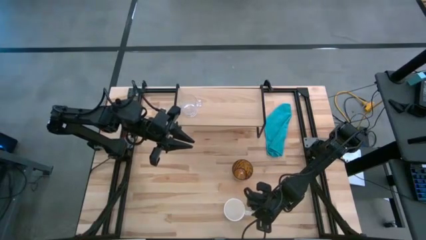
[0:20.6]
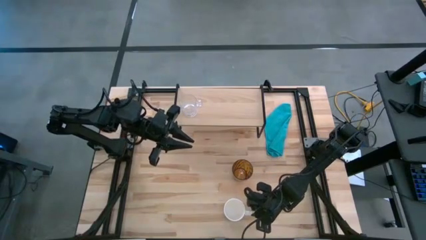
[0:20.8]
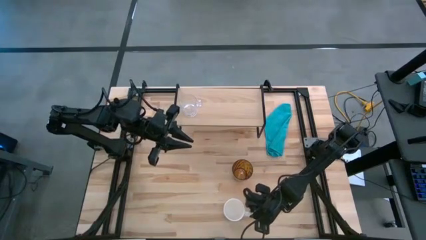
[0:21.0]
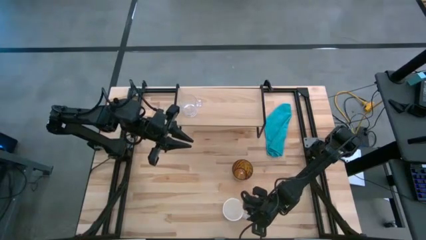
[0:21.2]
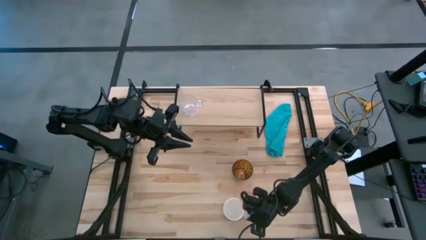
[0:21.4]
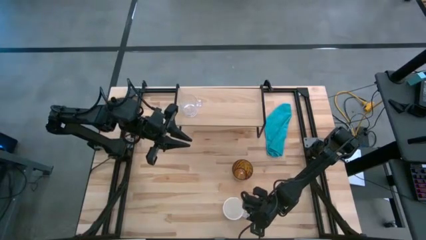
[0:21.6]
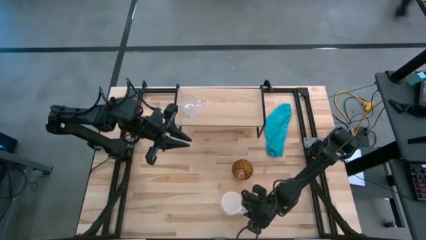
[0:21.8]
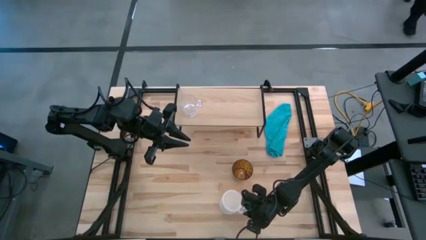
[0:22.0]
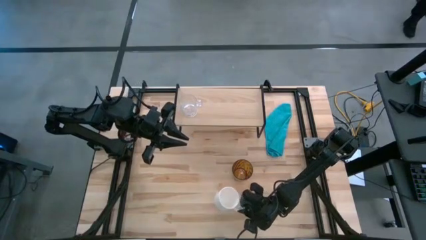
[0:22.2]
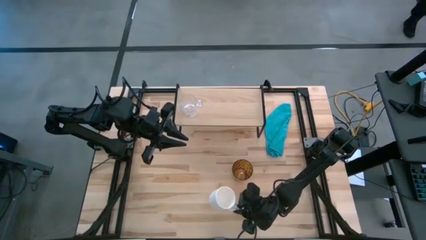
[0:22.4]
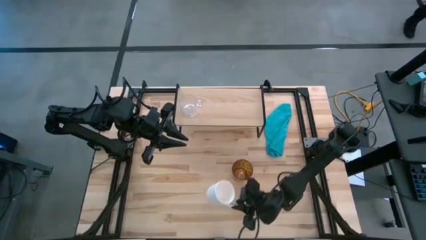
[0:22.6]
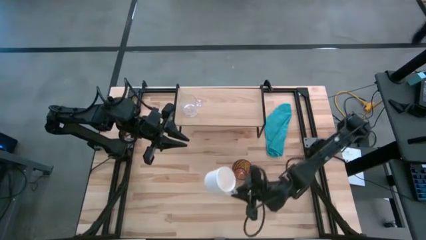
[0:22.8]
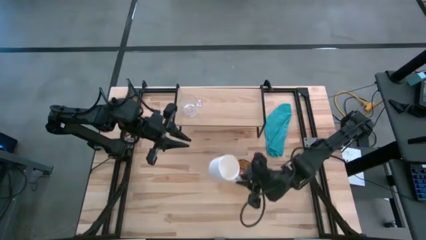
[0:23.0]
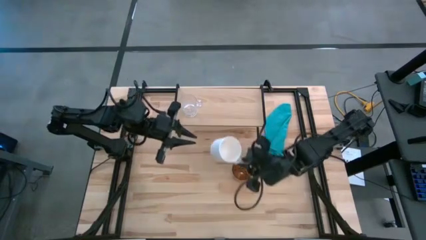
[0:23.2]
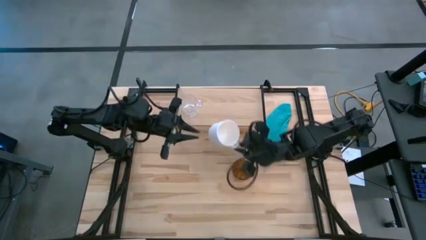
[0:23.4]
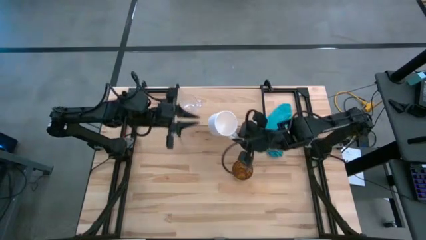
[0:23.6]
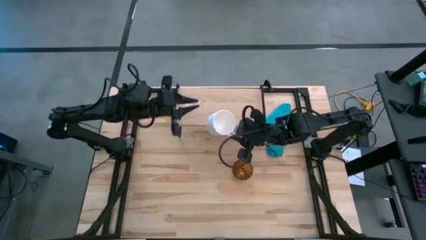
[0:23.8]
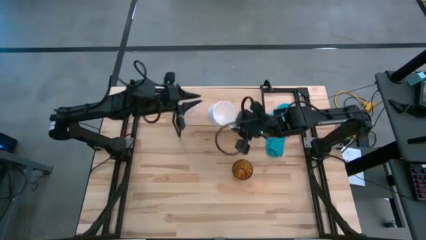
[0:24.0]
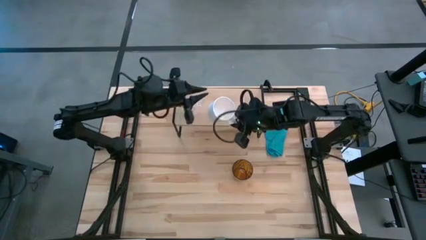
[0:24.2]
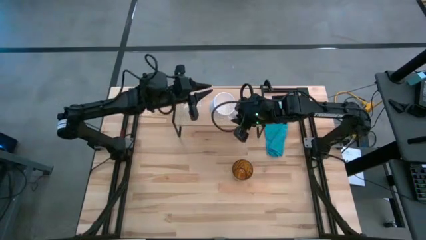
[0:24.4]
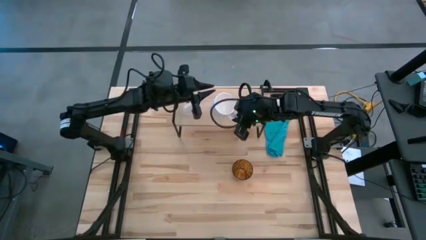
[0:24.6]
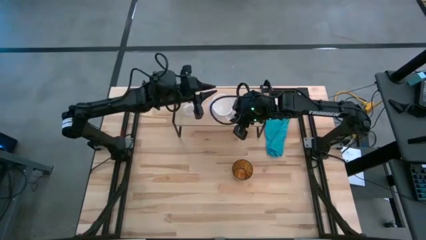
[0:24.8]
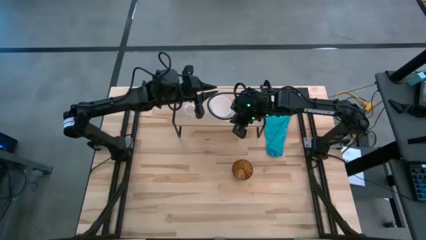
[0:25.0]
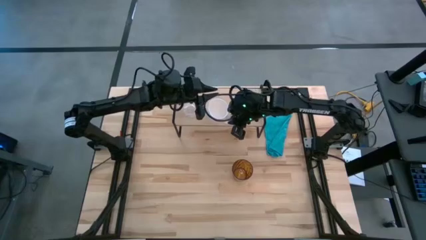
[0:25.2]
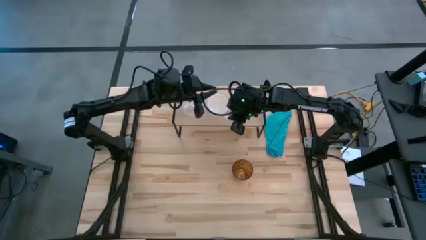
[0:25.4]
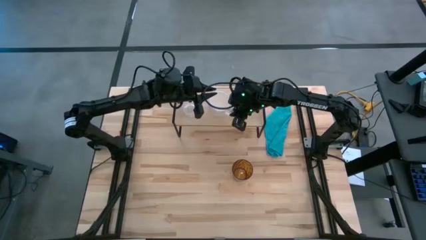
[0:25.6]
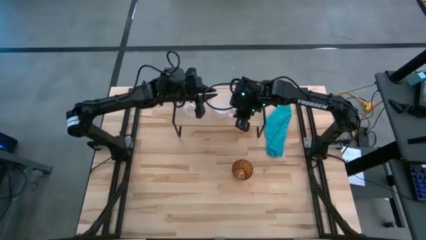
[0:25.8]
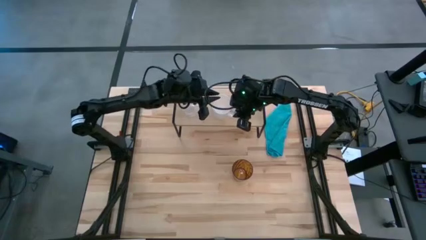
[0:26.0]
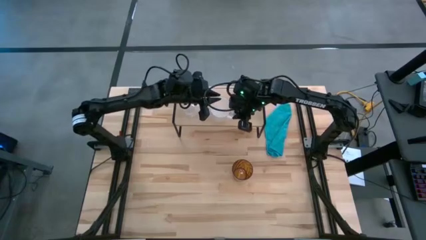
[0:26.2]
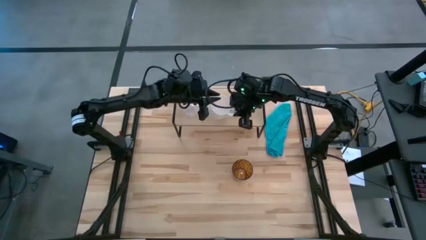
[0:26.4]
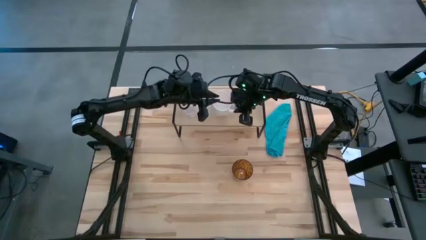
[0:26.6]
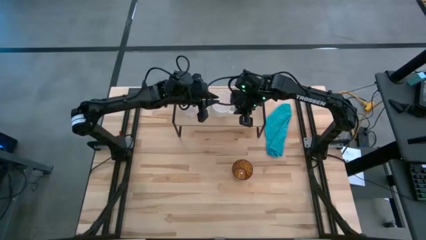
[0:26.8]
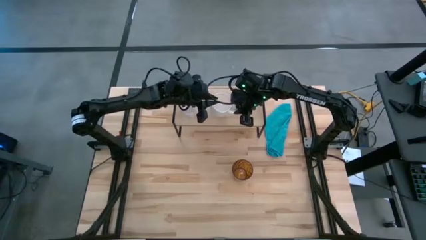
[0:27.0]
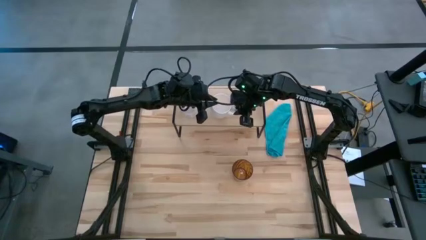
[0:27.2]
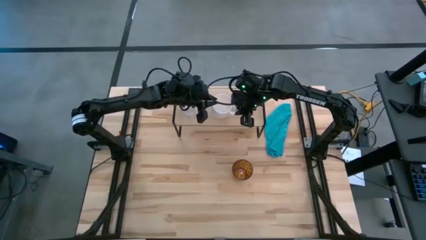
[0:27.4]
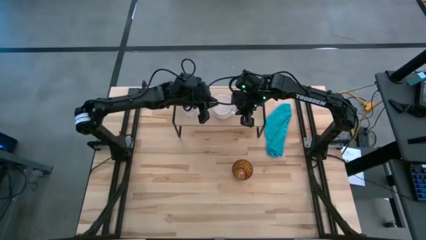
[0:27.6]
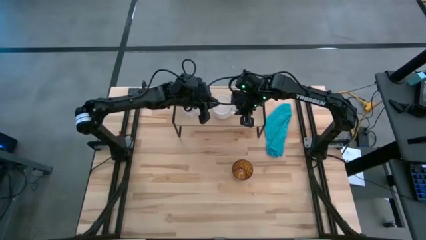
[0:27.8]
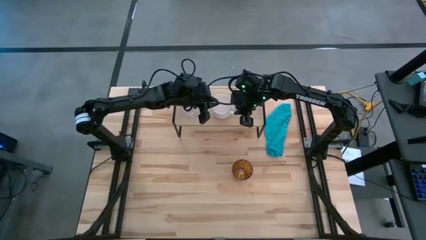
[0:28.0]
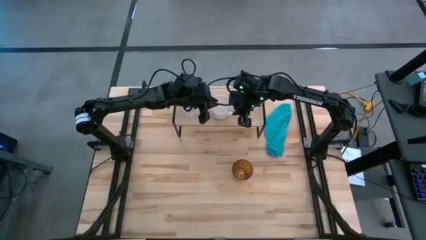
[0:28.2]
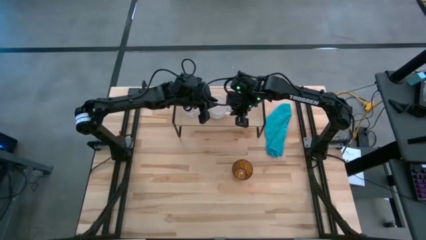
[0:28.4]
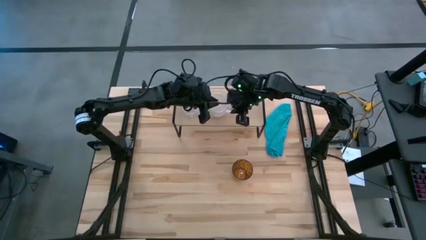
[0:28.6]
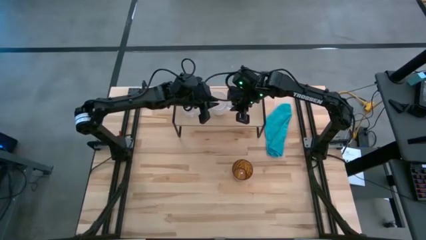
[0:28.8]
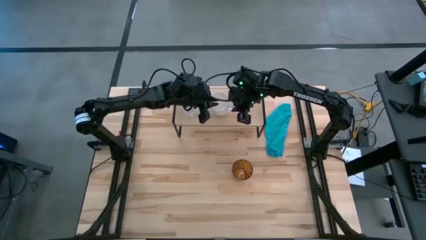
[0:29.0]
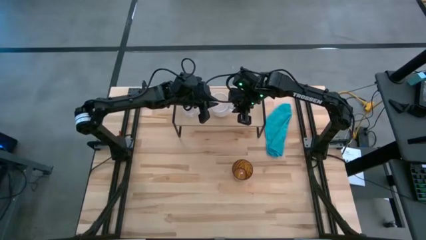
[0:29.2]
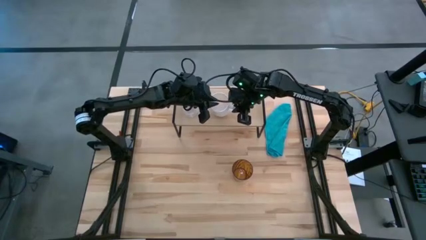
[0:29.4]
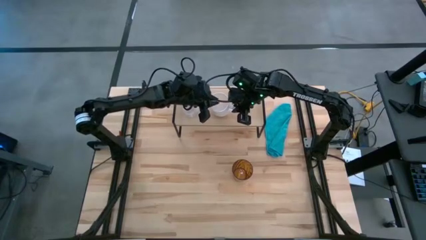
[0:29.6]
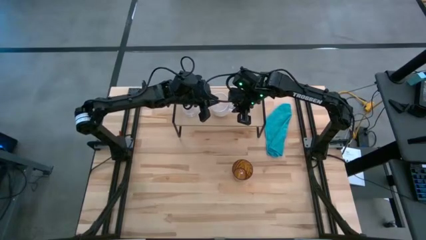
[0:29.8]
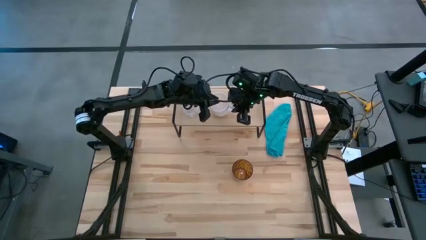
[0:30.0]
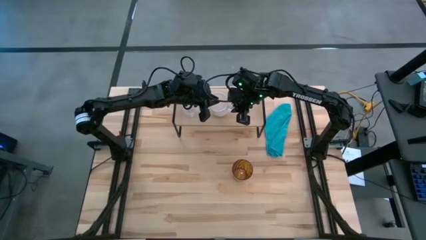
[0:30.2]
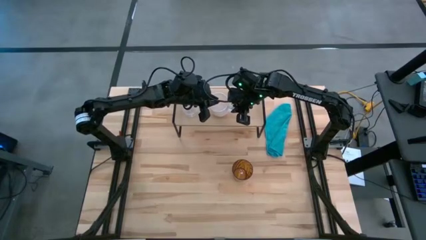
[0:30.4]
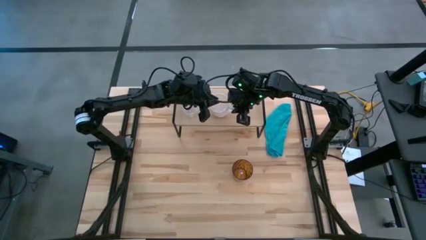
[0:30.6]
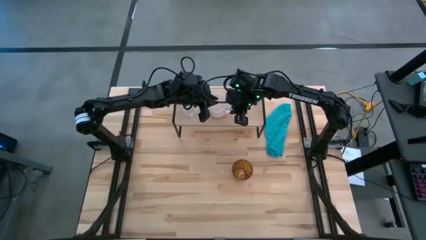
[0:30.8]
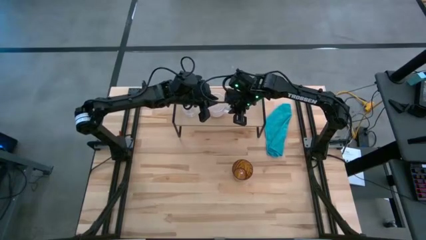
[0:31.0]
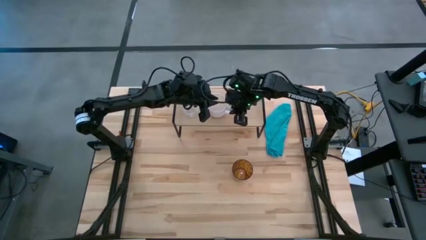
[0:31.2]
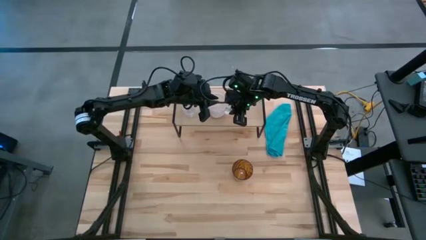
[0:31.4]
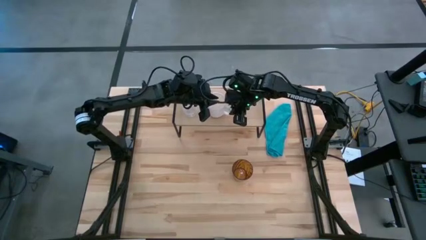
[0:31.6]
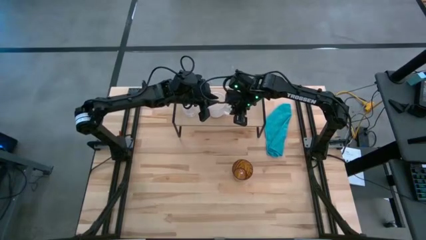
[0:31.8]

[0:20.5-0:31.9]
Task: Stack small to large cups/mugs on shelf
Put the white mug on the shelf
